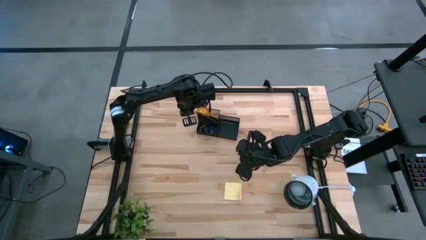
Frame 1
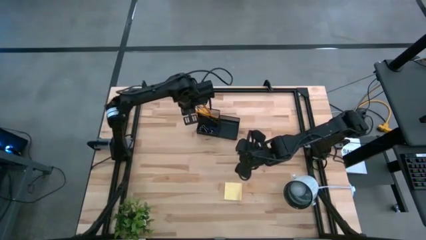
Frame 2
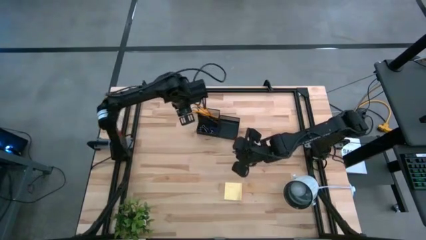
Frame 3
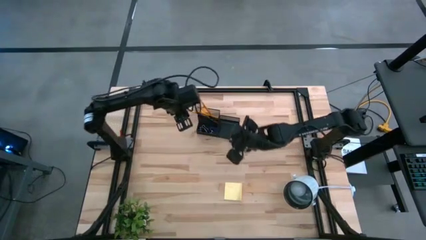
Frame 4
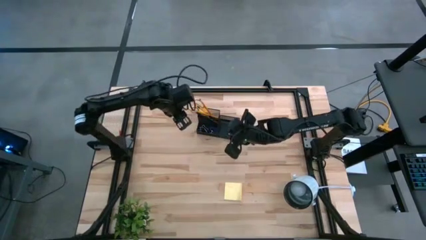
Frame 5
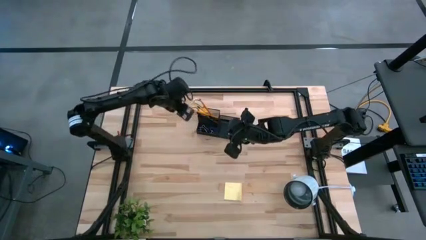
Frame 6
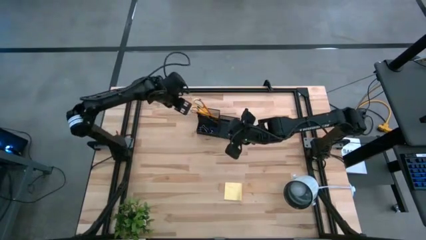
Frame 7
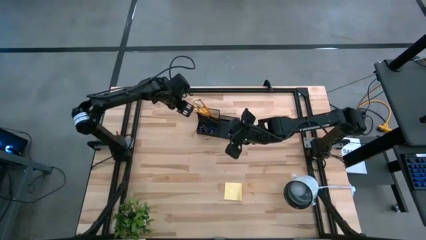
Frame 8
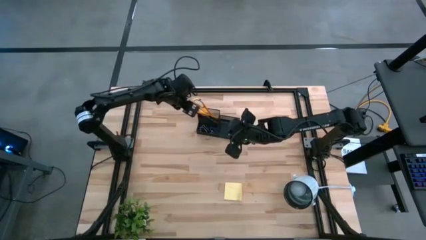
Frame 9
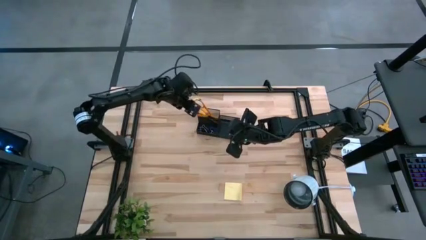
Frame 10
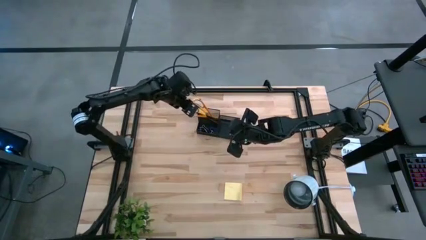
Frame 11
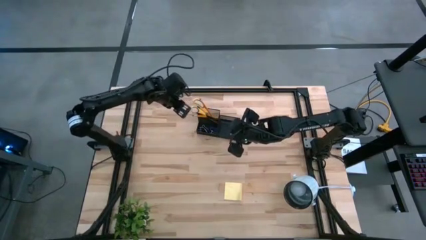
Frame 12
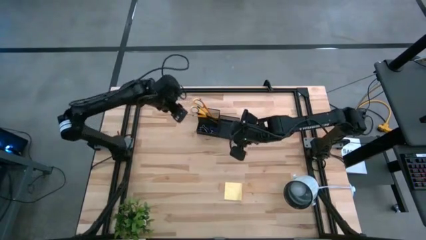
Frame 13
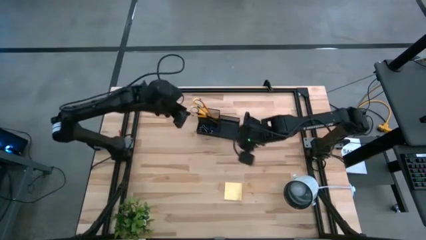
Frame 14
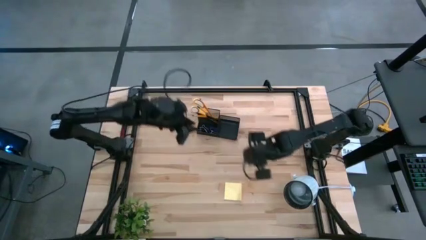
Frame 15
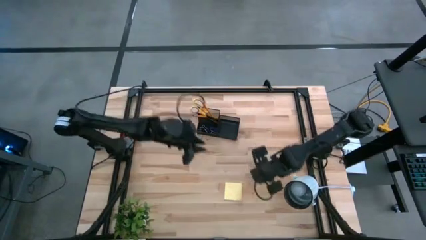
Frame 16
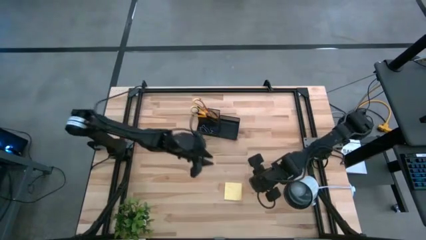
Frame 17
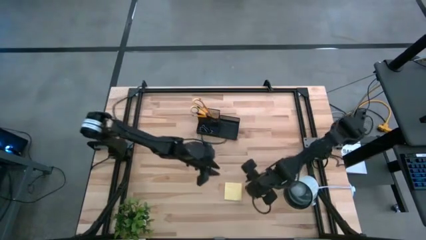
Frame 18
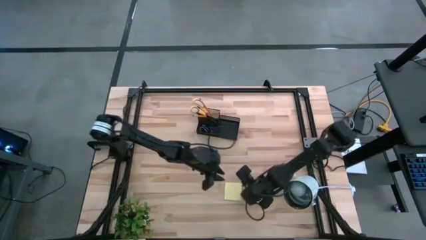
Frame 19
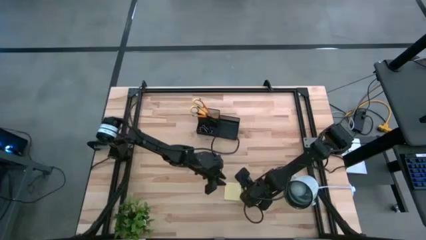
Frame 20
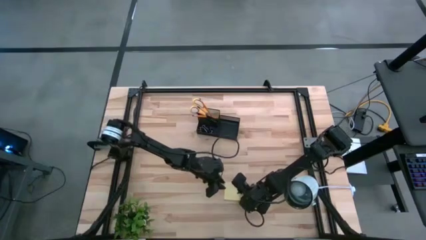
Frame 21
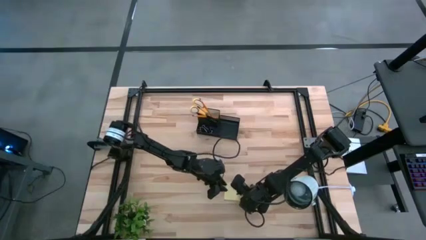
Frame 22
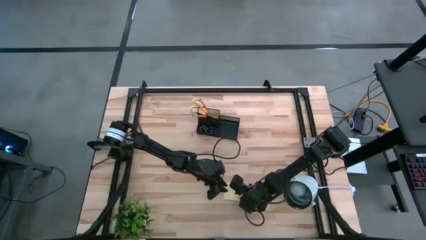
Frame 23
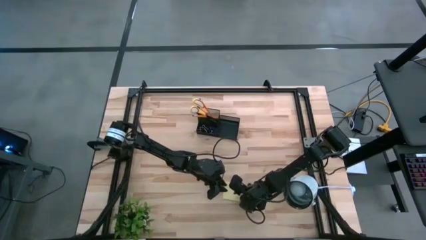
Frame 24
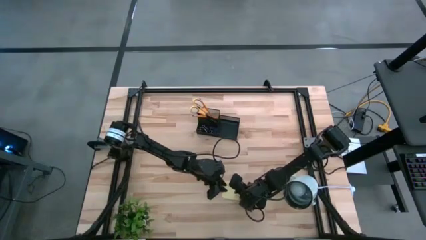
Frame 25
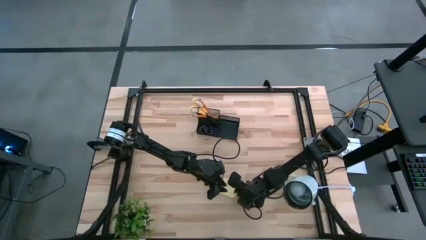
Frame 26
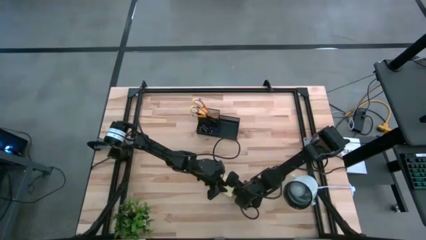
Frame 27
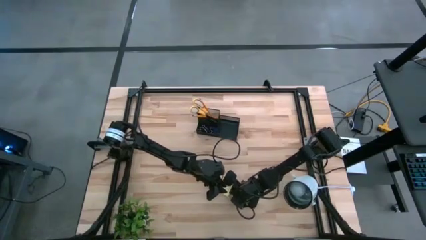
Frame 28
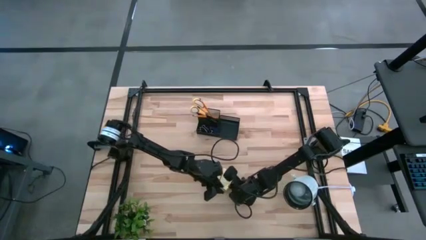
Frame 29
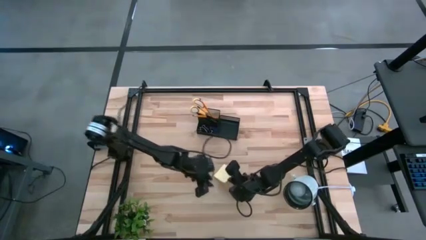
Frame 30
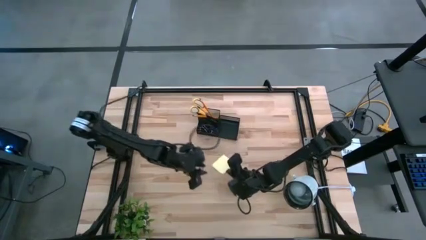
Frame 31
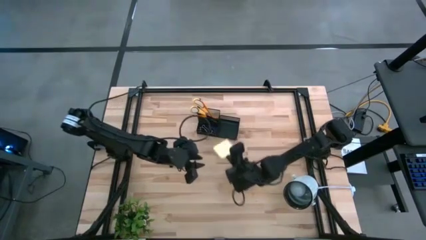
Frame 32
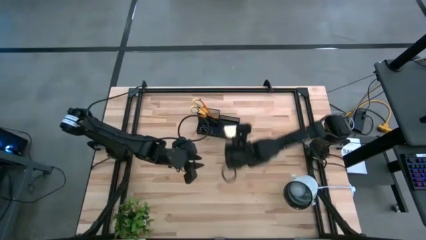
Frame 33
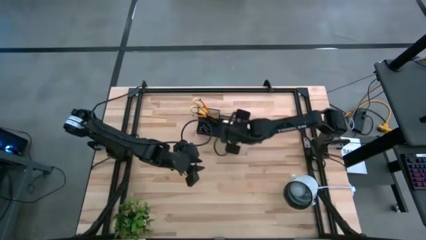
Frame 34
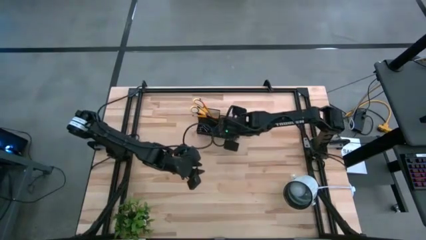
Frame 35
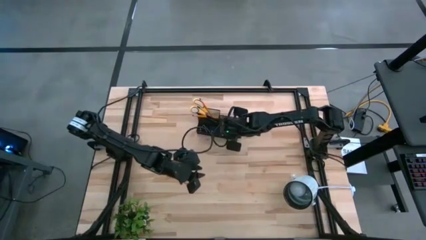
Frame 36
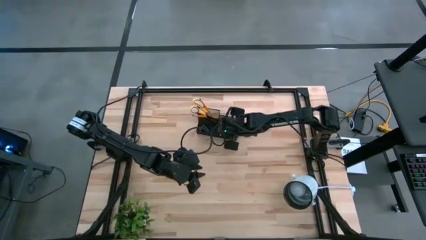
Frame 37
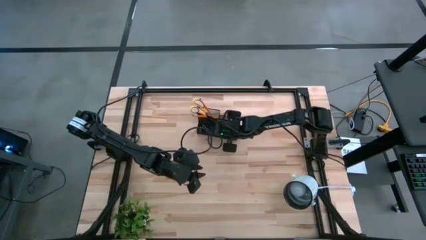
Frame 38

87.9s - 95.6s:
Task: Pick and place office supplies into organizer
Put the yellow sticky notes into the black organizer bin

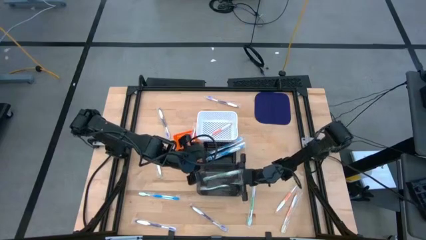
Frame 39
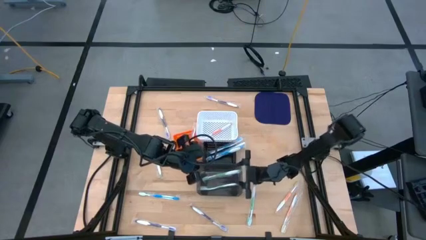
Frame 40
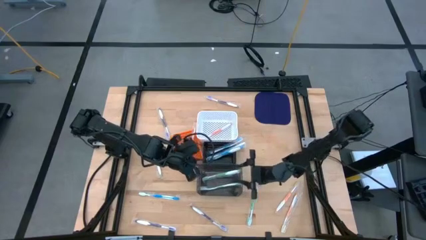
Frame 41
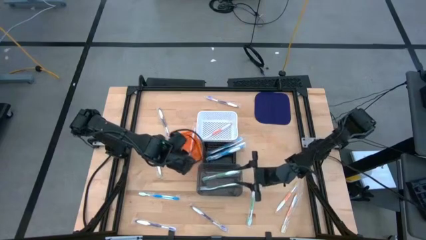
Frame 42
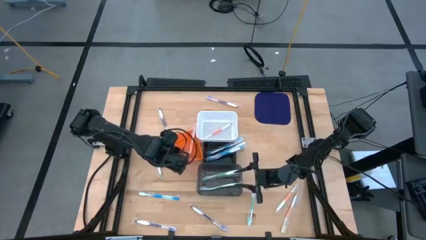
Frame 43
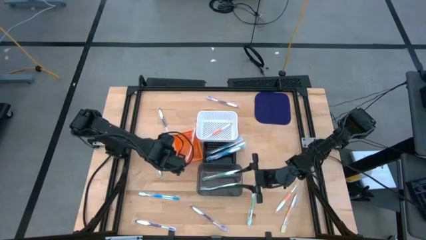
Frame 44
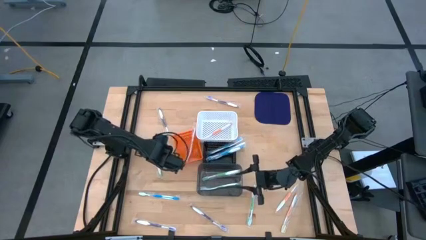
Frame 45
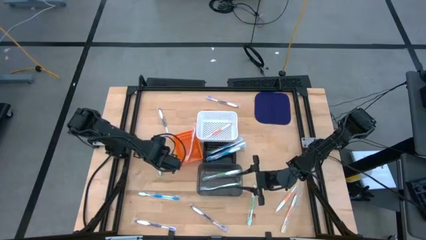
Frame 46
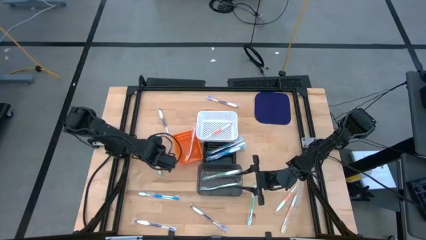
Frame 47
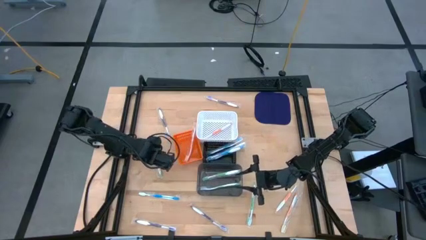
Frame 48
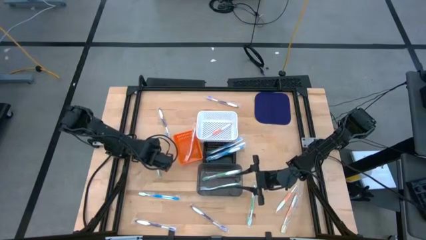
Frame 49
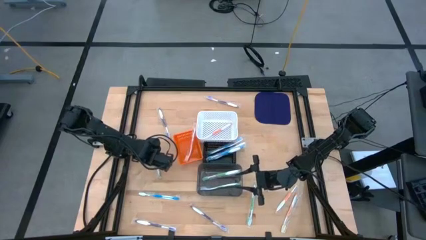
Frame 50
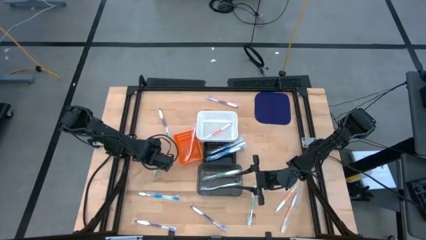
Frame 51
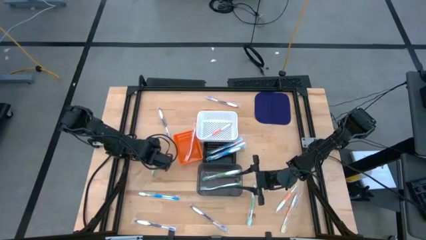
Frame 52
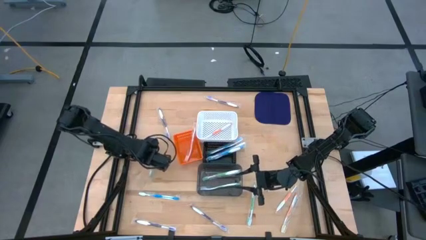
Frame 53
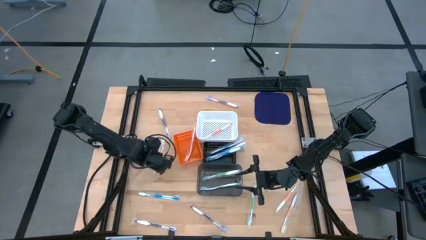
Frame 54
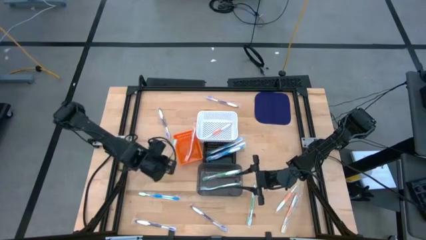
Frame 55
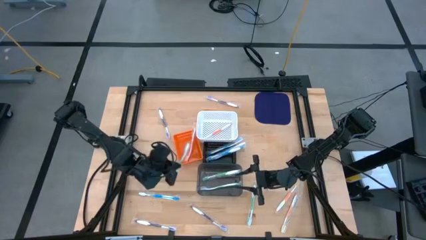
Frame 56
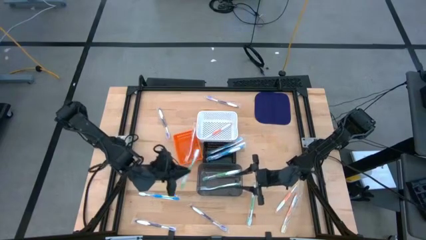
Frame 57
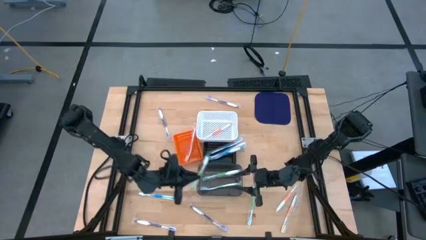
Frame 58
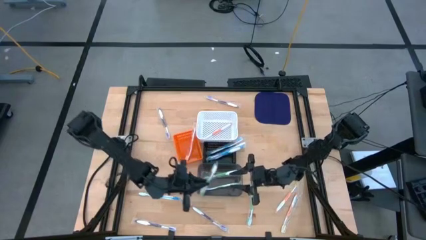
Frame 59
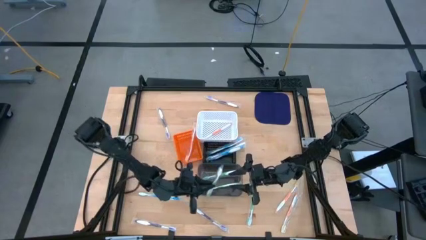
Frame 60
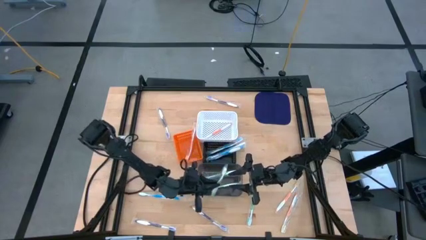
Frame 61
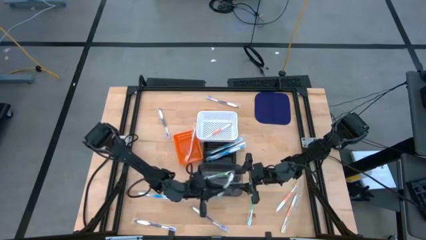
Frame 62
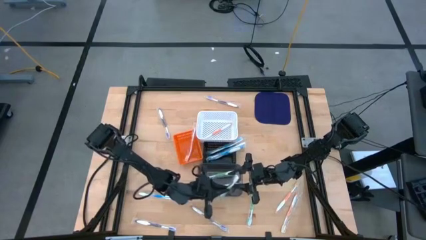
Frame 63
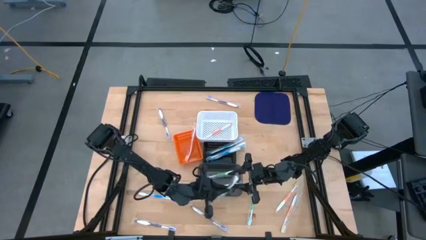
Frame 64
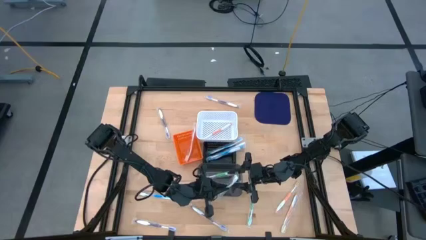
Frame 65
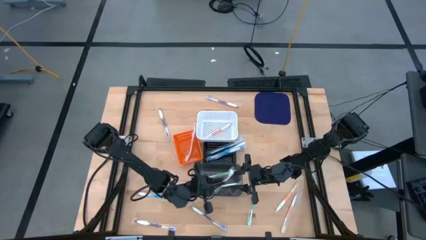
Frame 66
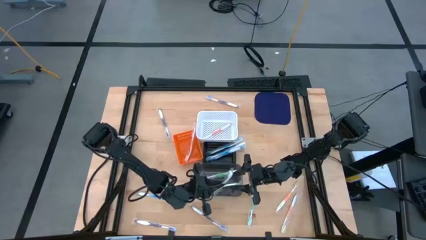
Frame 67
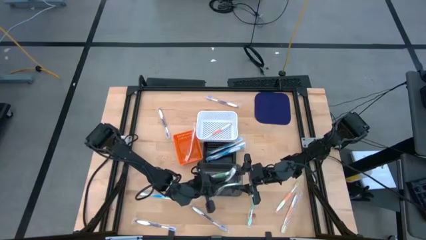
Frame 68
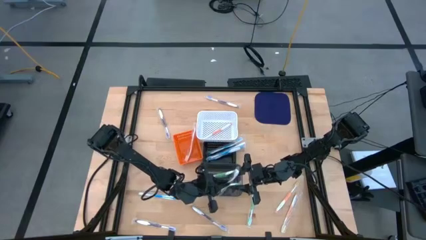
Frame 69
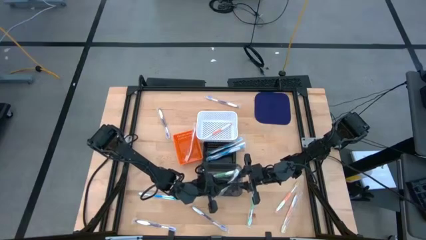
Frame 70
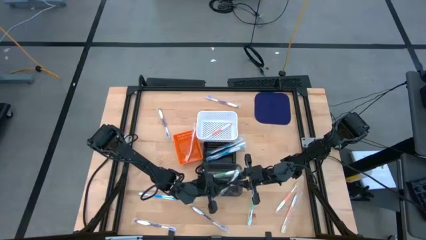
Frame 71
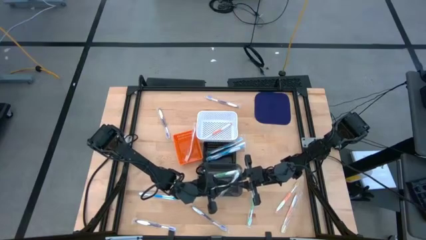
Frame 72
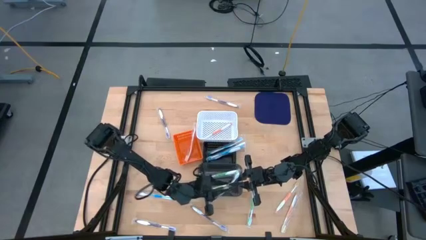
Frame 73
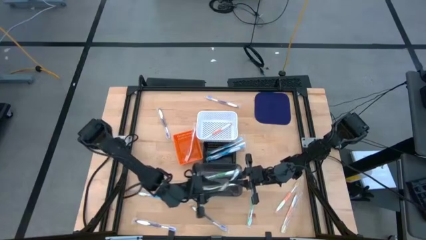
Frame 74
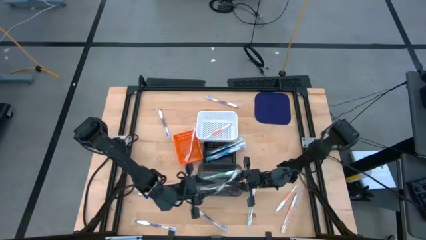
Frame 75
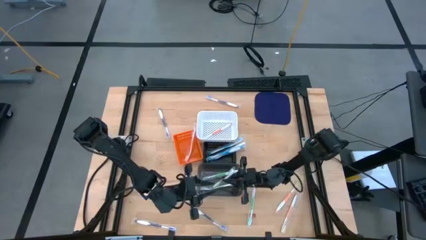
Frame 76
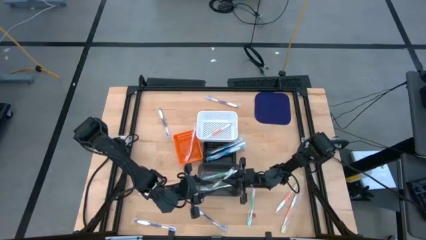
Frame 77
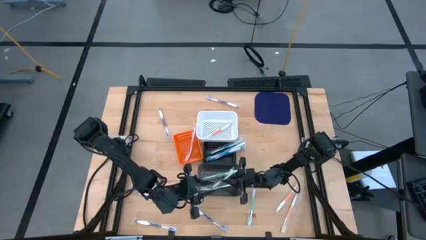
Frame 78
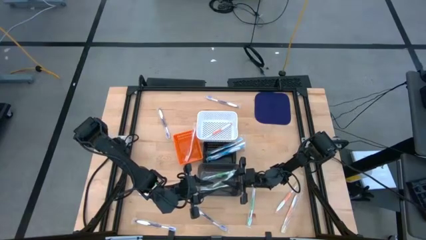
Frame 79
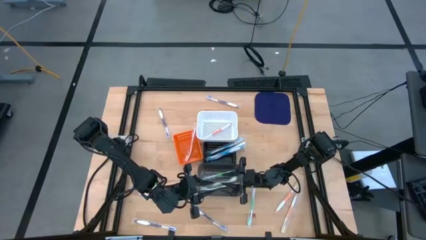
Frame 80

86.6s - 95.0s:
Task: Pick & Place Toothbrushes
Put the top green toothbrush into the black bin
